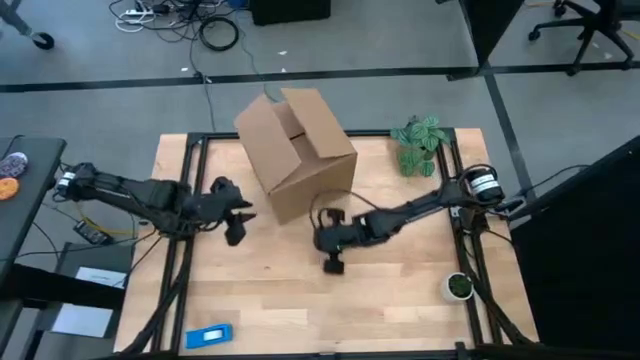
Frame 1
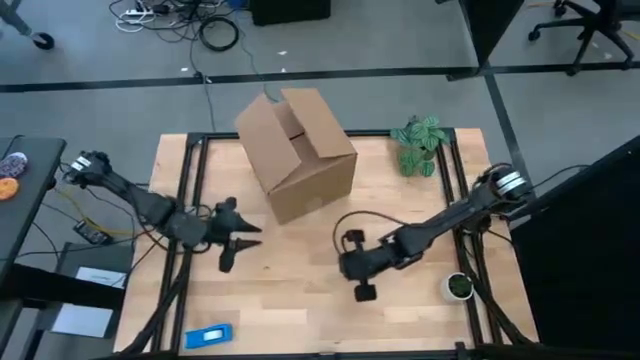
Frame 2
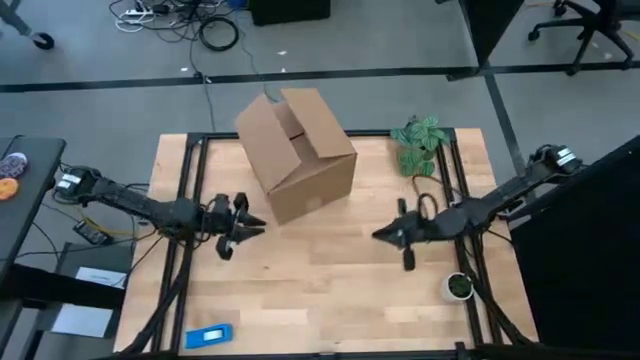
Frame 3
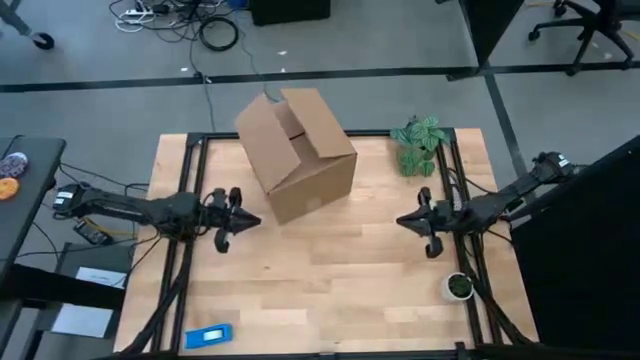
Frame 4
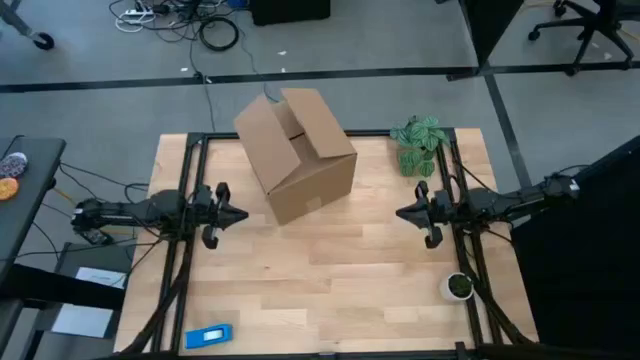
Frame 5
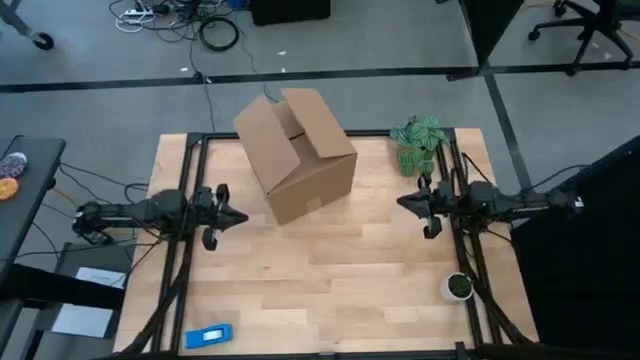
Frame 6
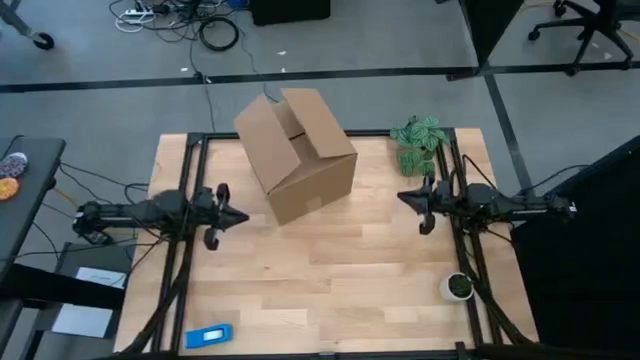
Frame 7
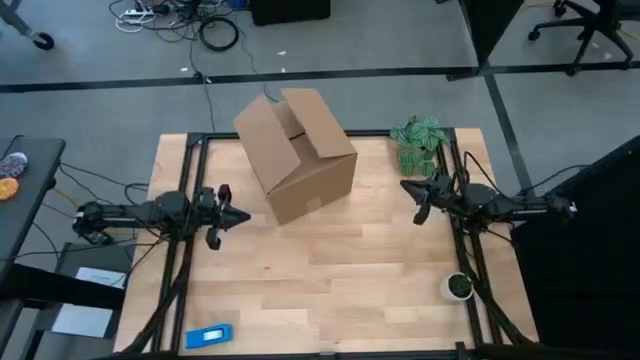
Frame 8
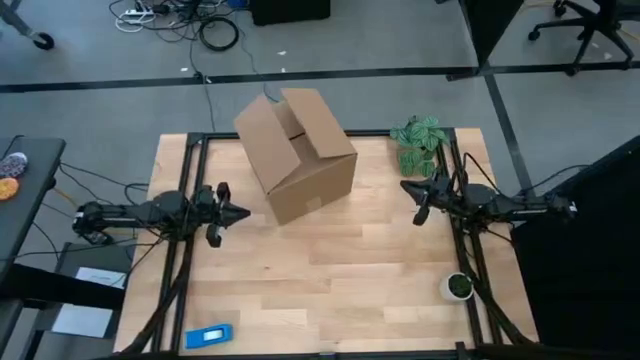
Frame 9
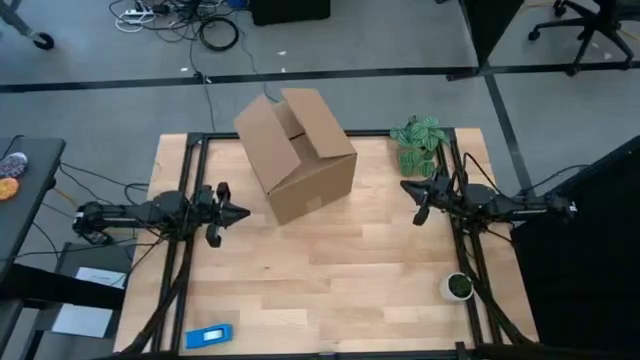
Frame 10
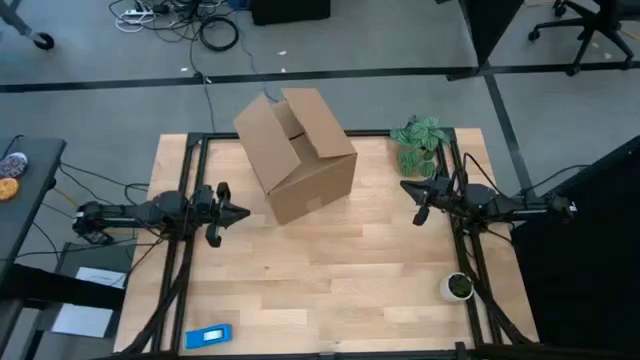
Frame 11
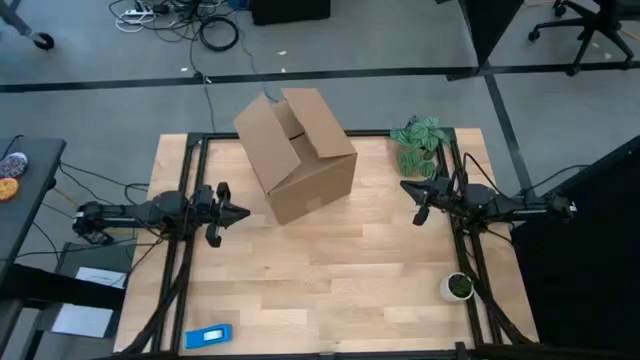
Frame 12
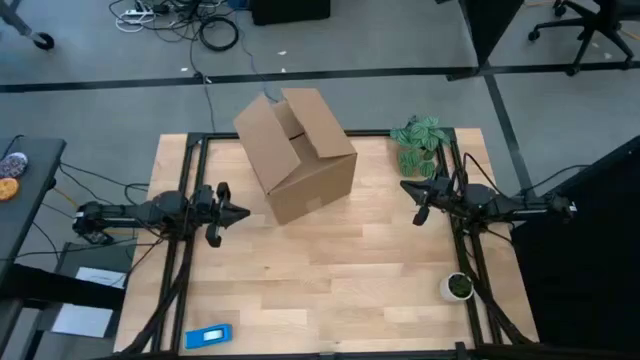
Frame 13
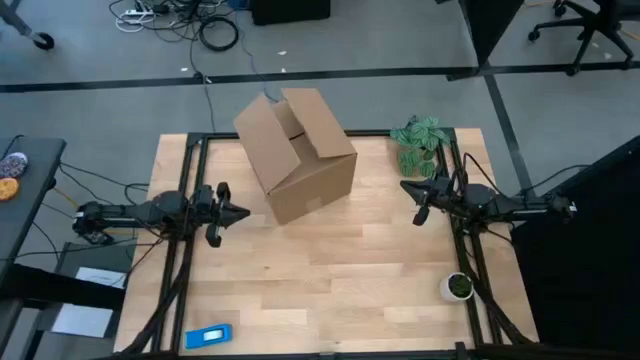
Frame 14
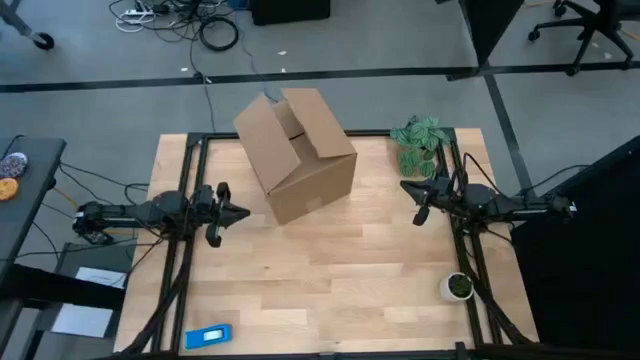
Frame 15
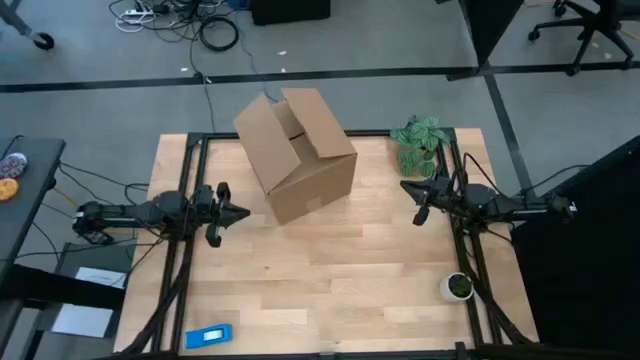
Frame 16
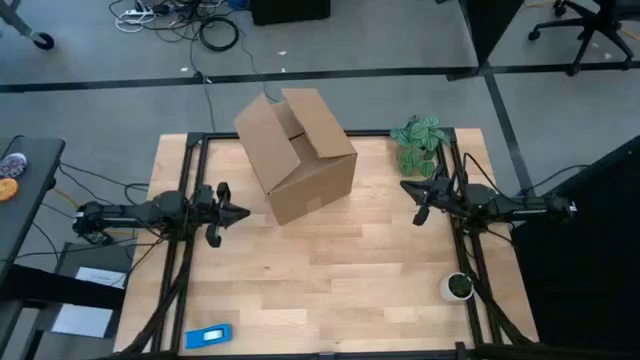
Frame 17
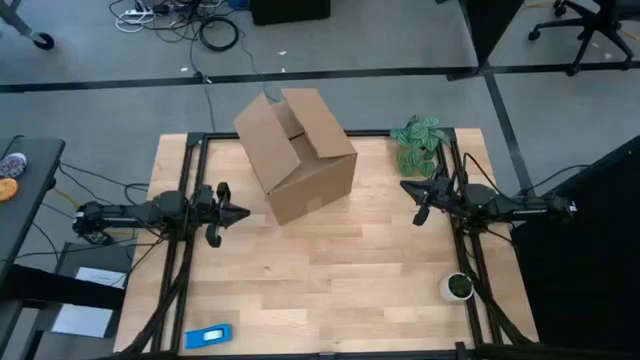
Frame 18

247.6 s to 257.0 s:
Task: wrap mug
Return to Home Position

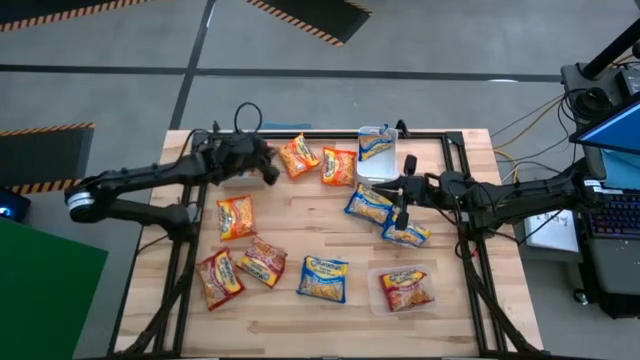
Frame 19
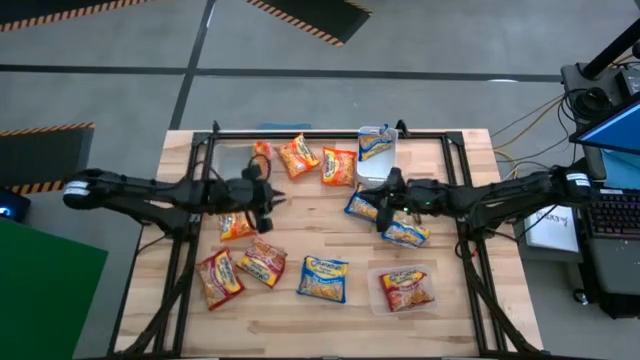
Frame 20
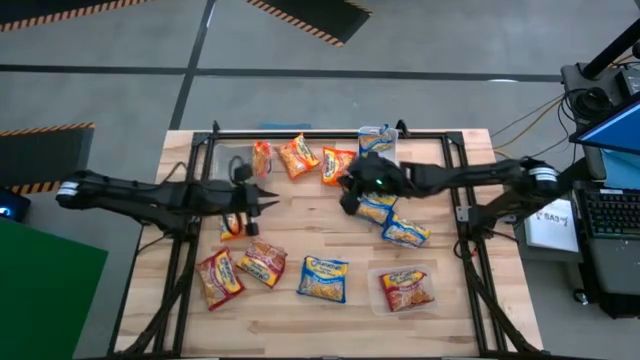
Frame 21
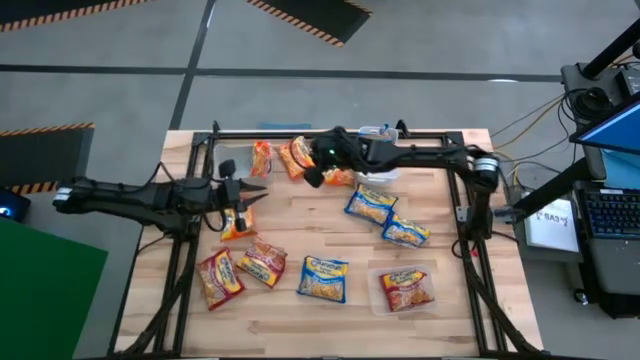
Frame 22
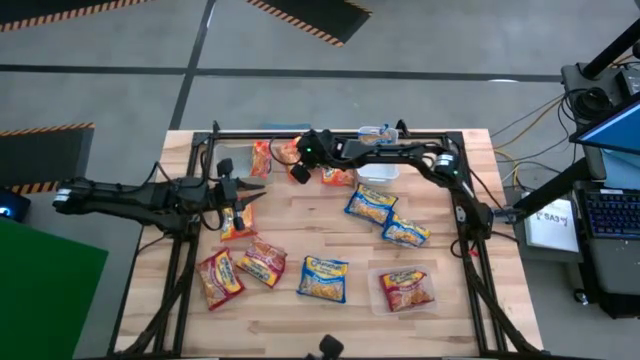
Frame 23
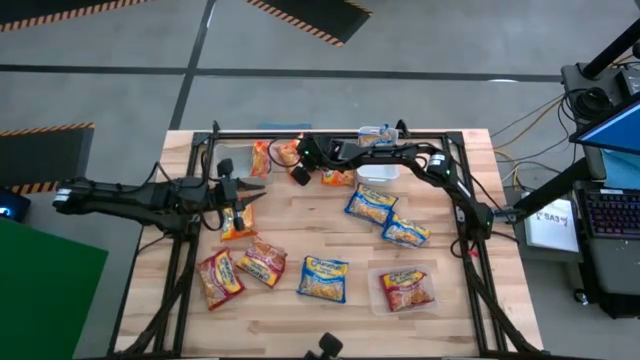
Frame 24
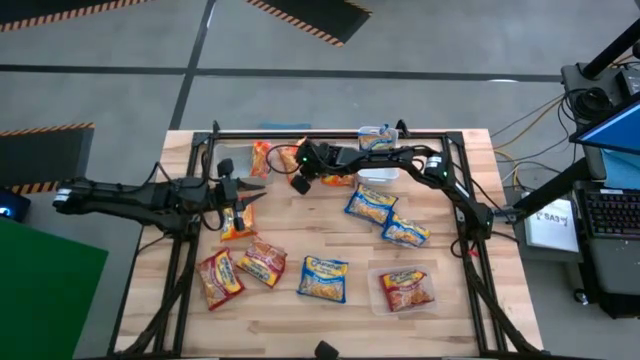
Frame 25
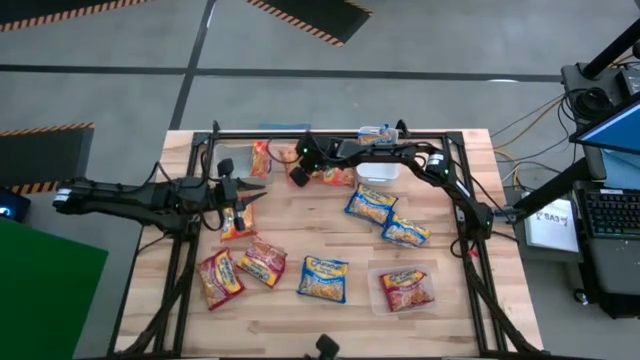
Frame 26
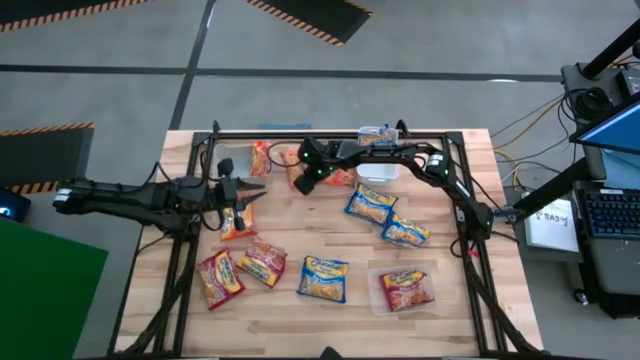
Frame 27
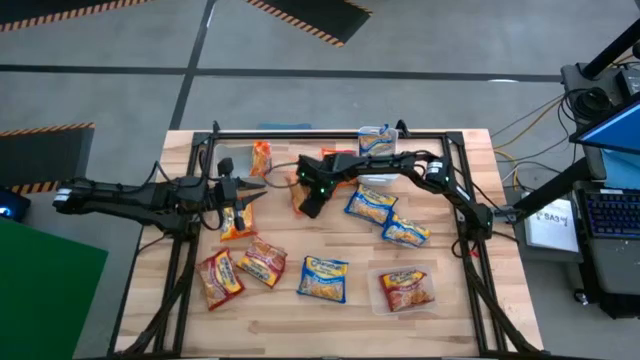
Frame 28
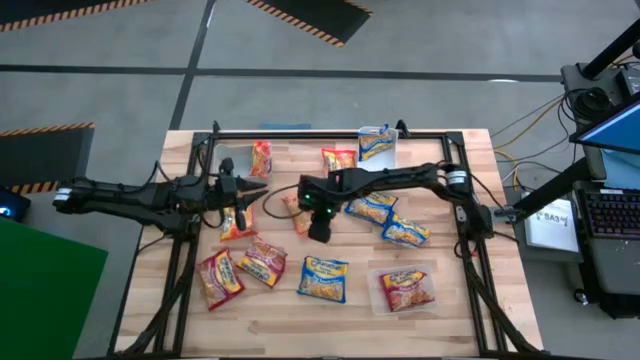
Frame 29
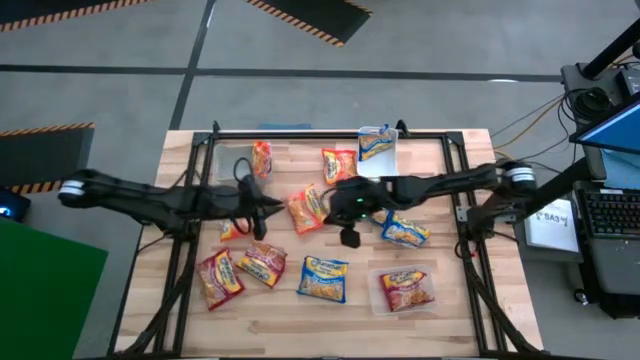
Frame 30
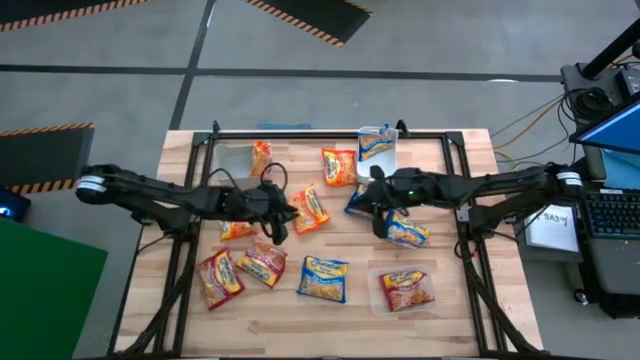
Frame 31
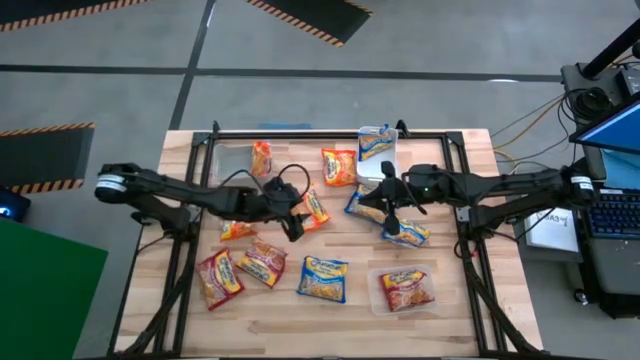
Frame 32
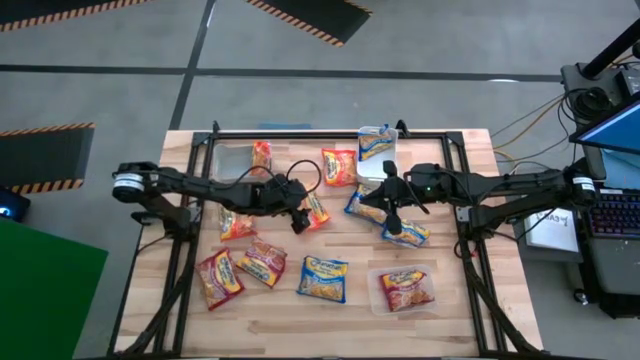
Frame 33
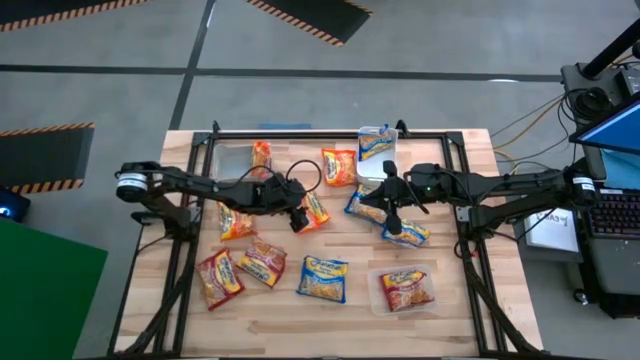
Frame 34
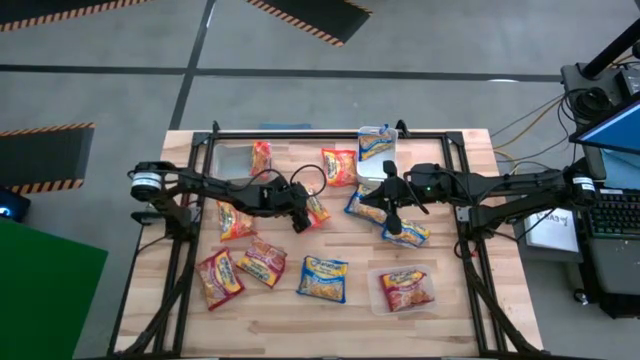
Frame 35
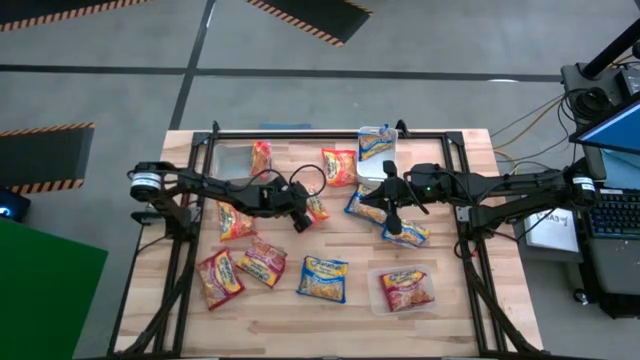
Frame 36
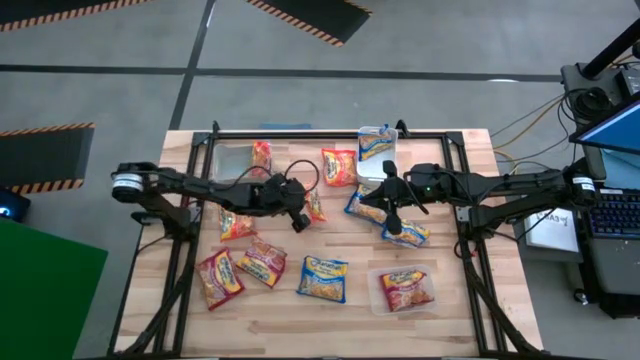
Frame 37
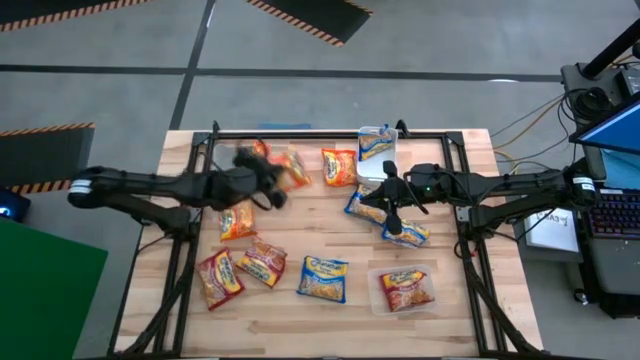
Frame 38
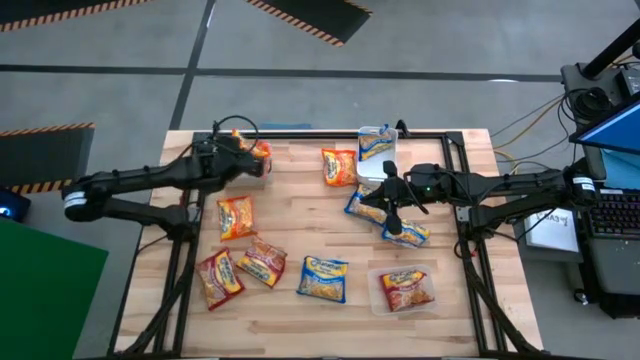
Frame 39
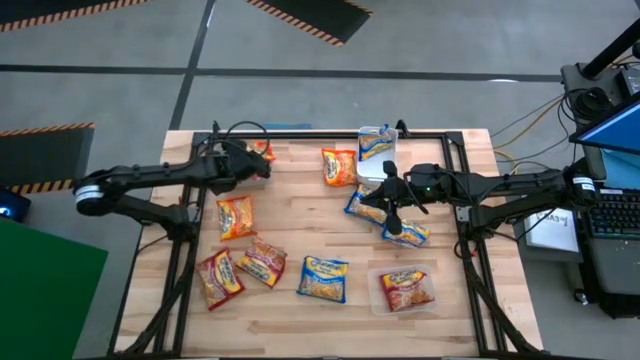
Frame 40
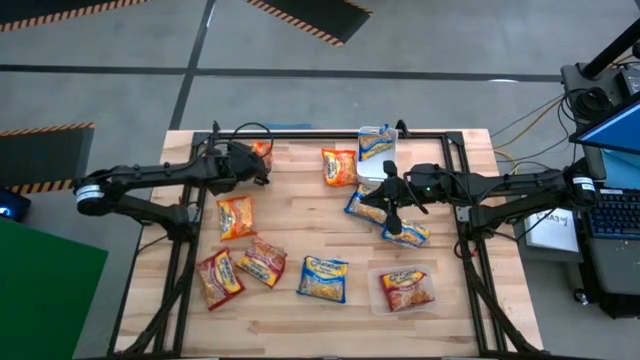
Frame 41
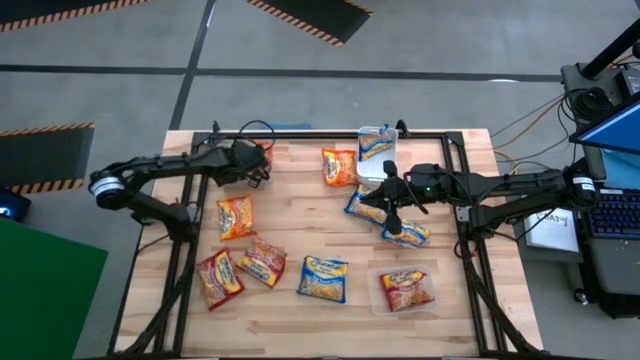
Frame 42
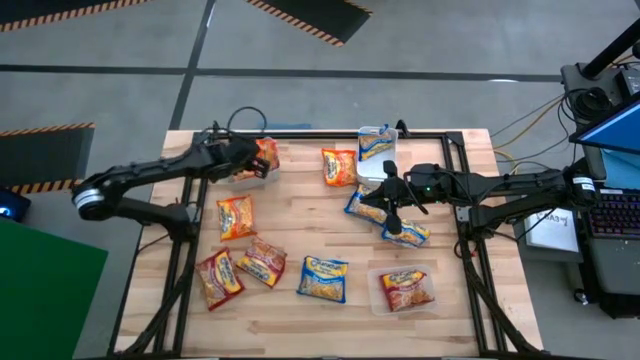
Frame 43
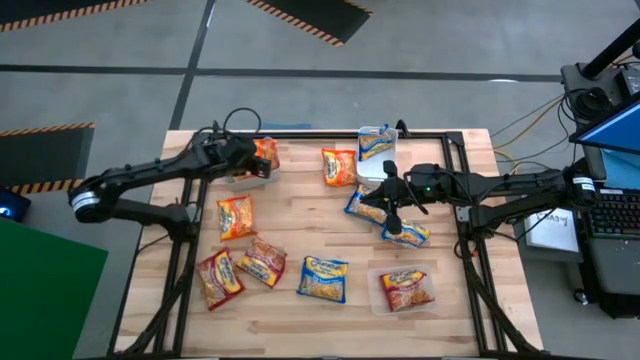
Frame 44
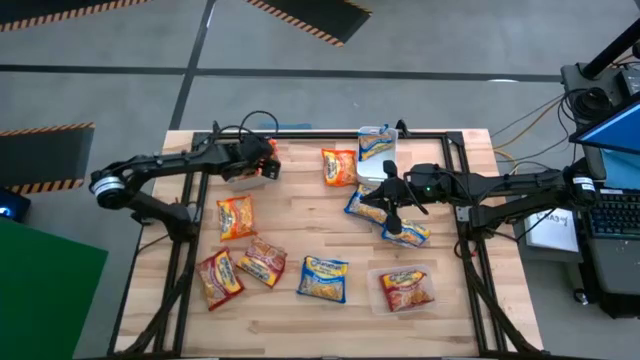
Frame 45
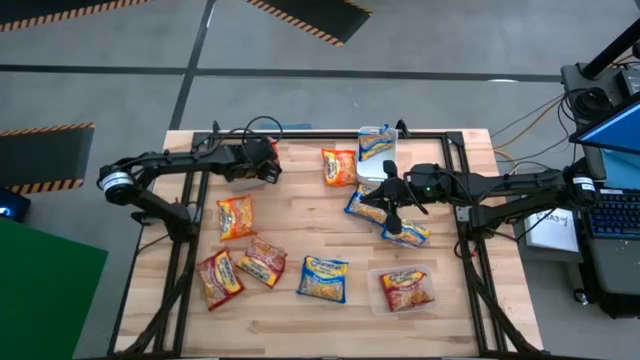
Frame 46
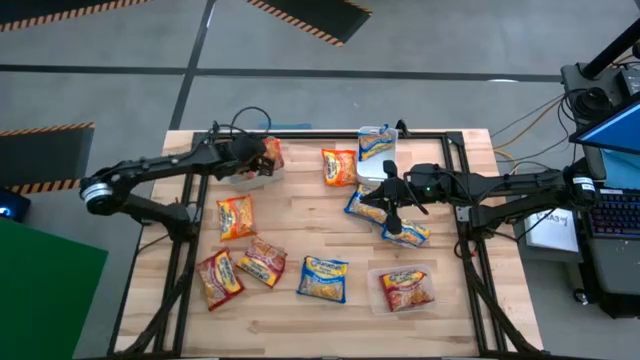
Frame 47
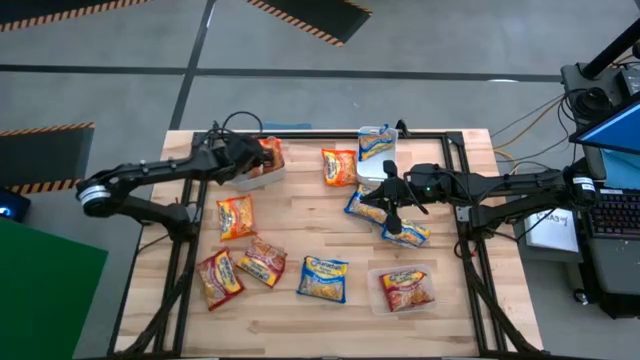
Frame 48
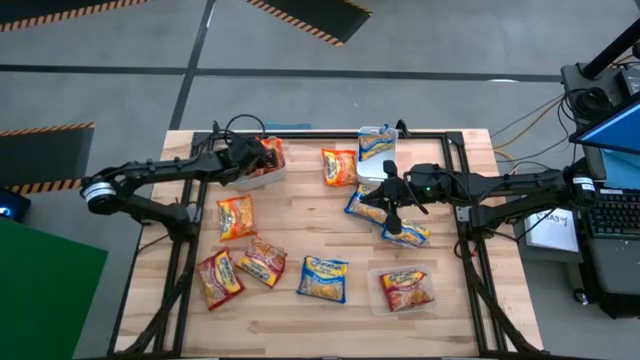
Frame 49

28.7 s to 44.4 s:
Task: Sort Maruchan noodles
Put the orange noodle pack into the gray bin
